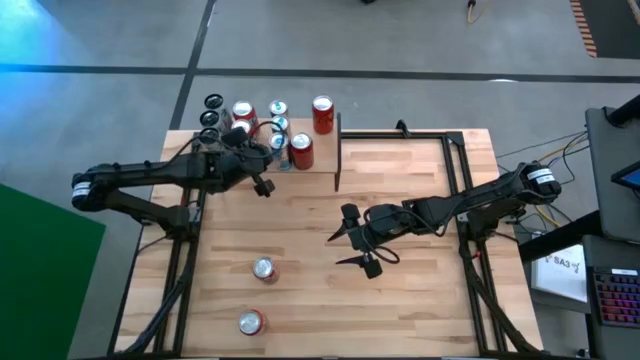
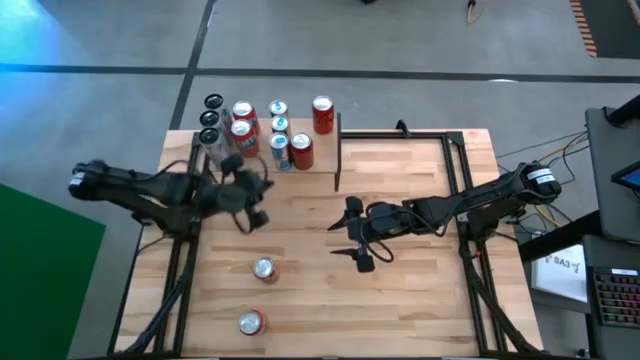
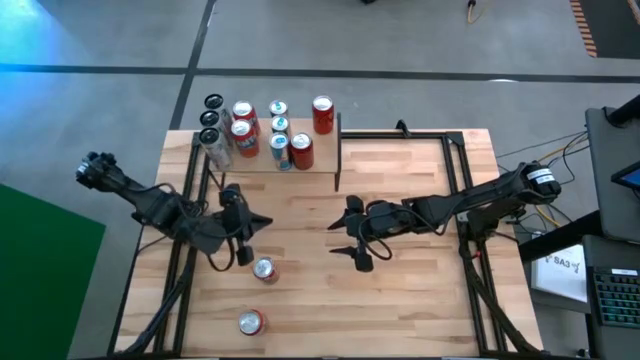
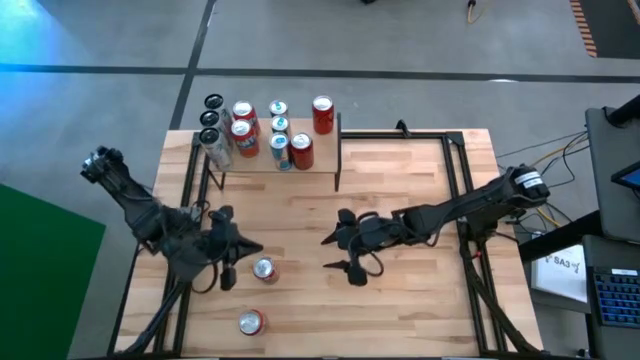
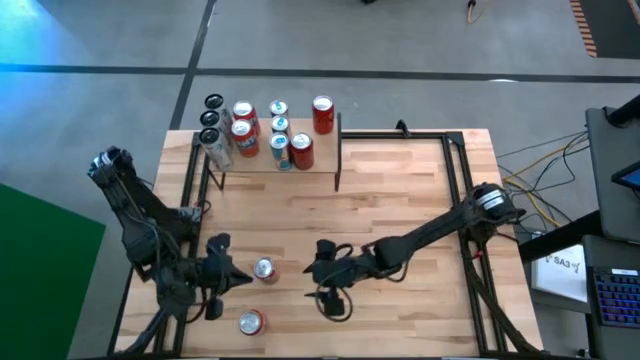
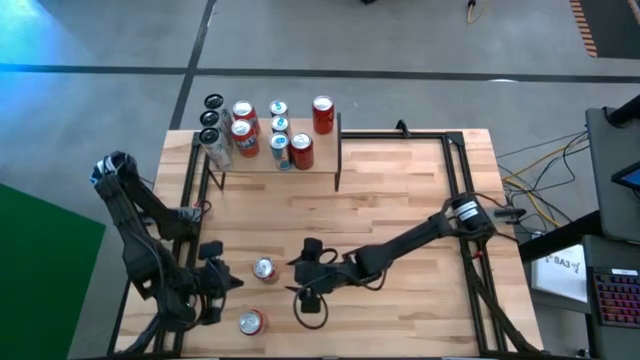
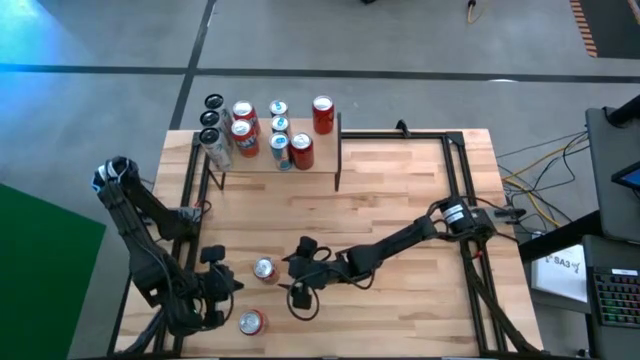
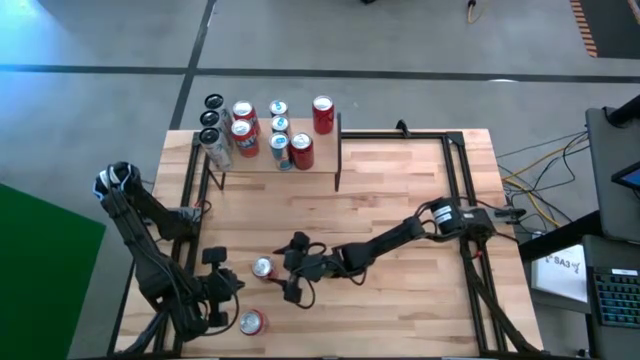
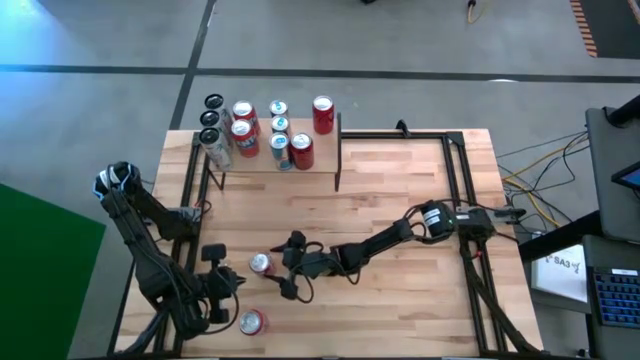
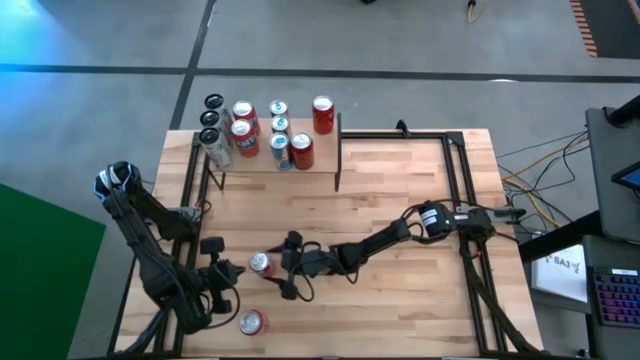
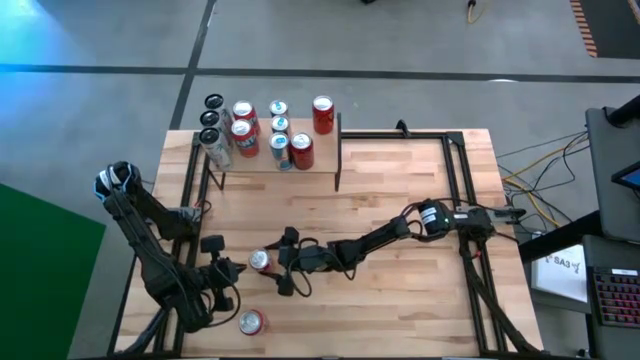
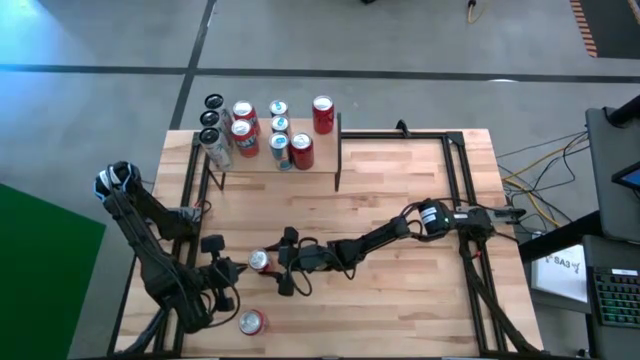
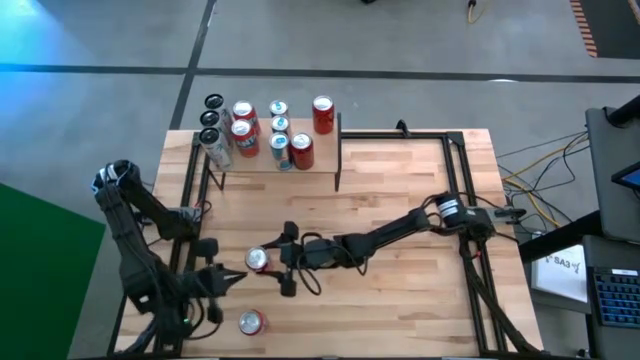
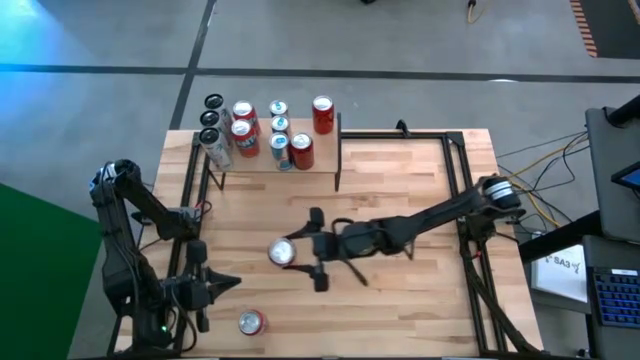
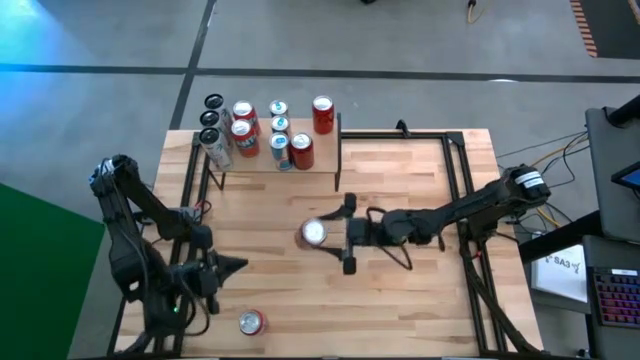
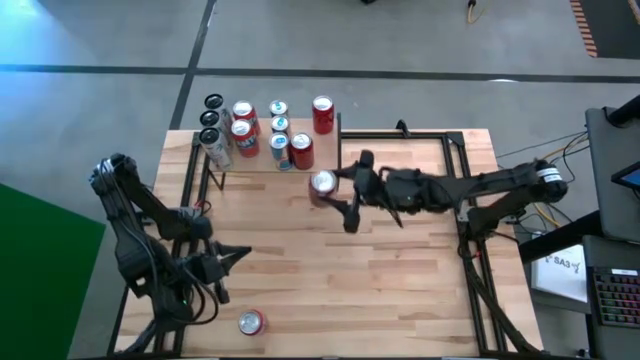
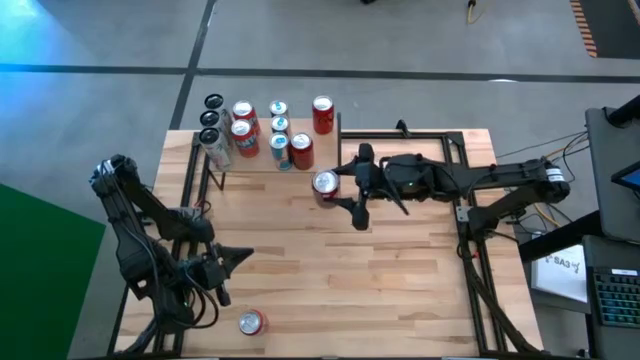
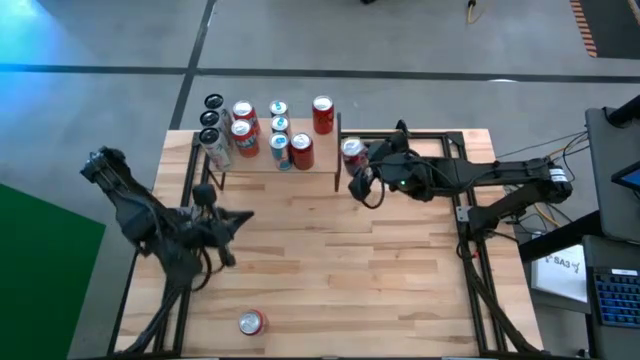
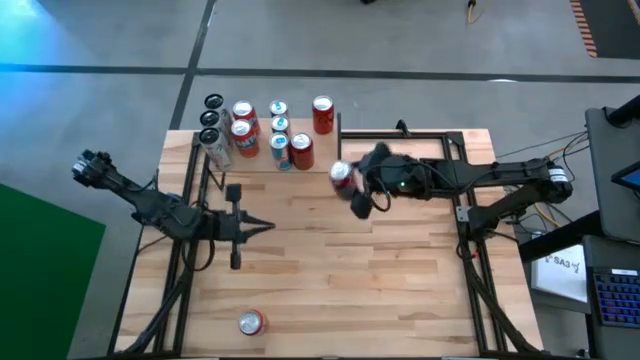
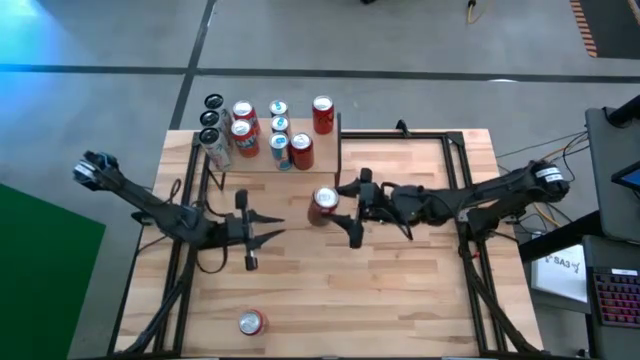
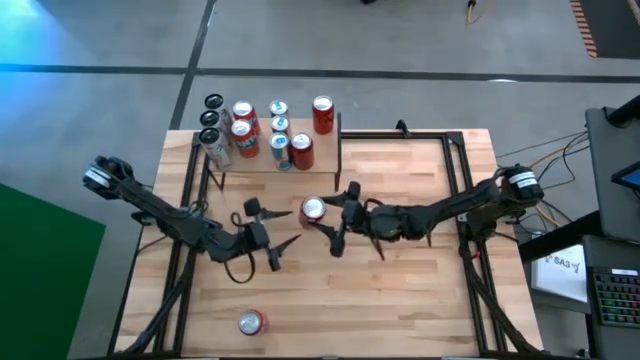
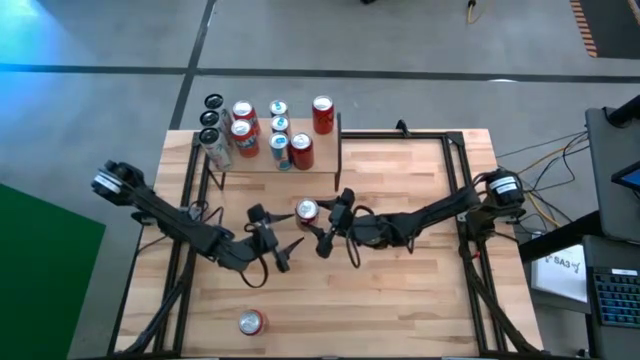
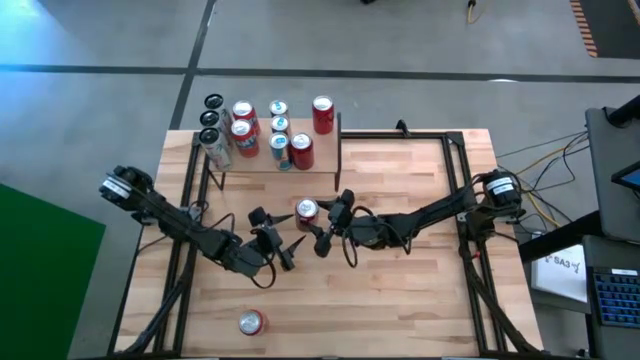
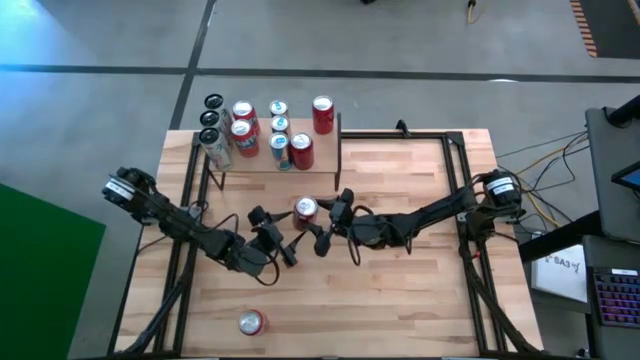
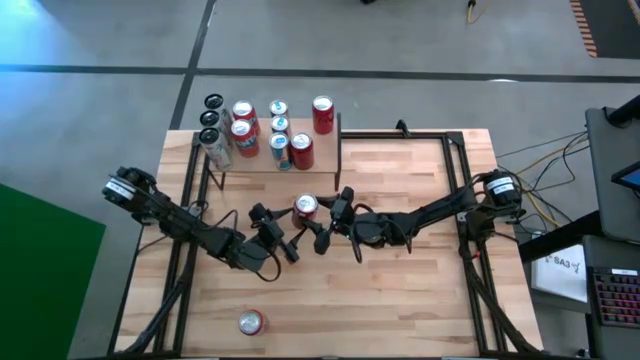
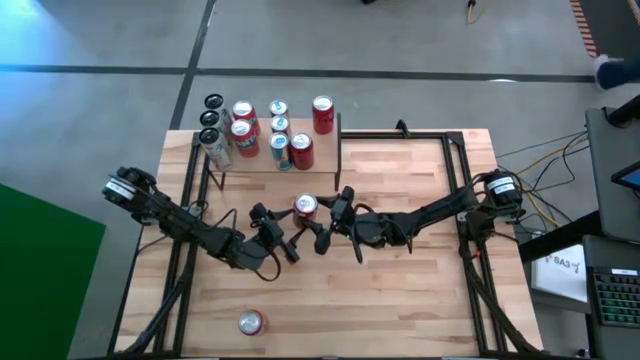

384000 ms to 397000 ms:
Task: Place canned beverage on shelf
Put the red white soda can on the shelf

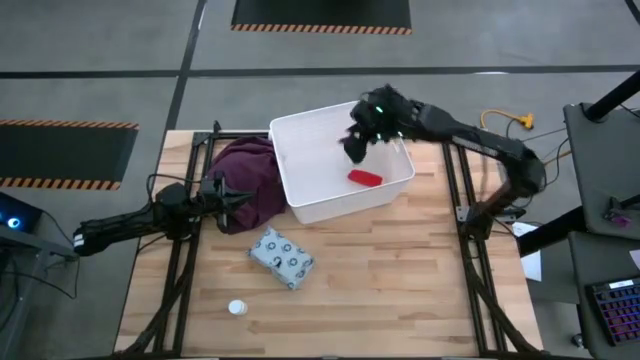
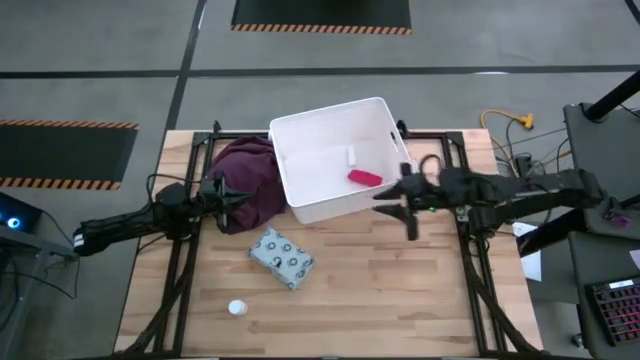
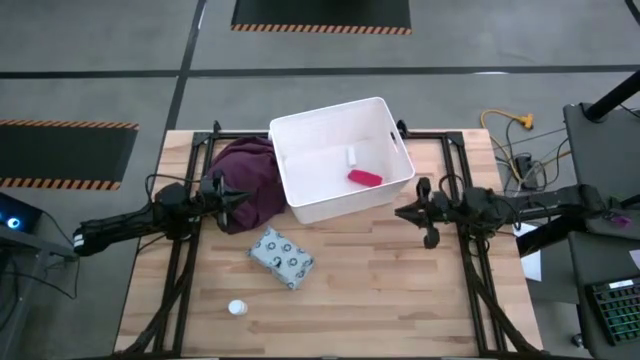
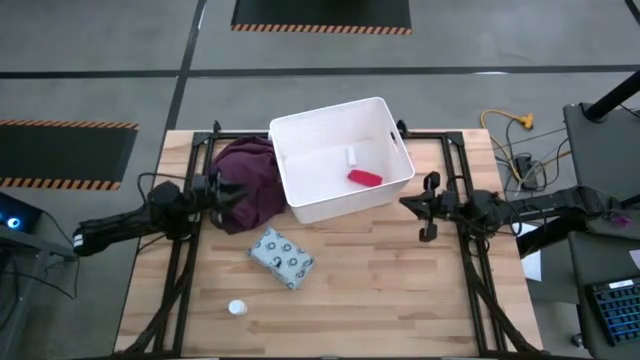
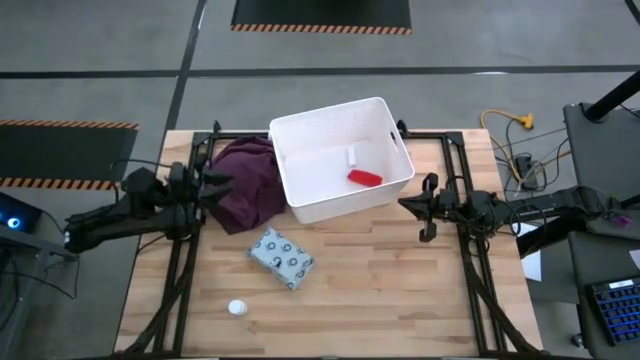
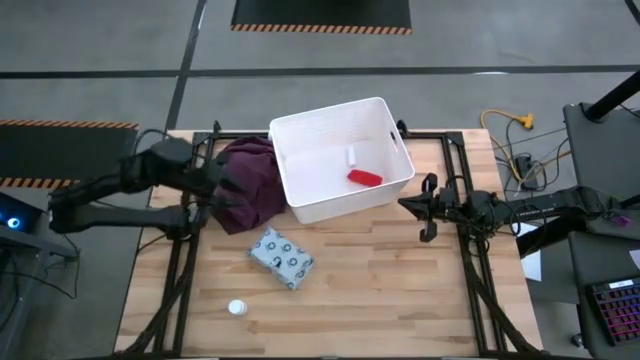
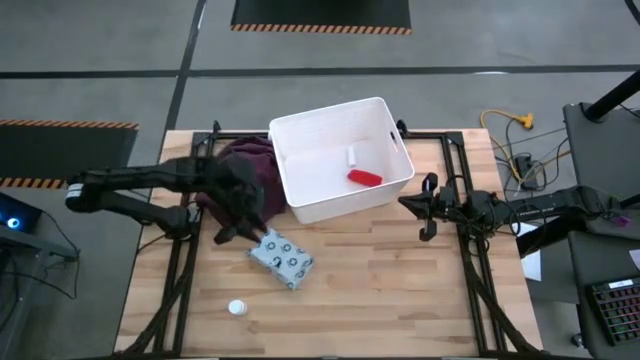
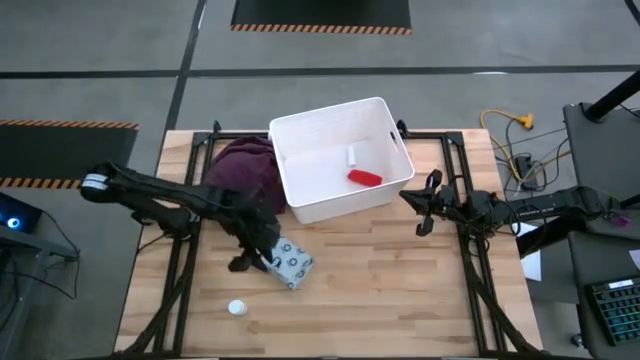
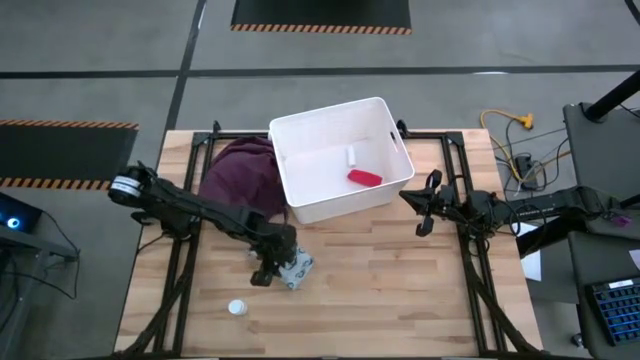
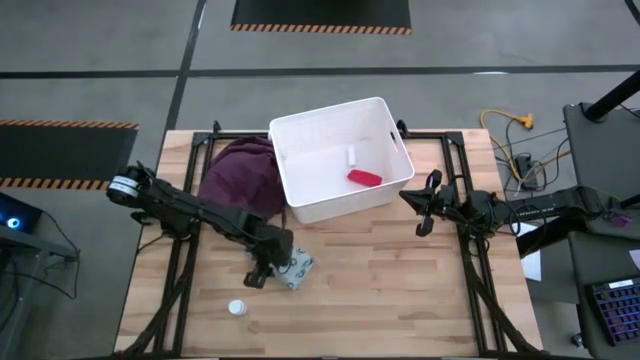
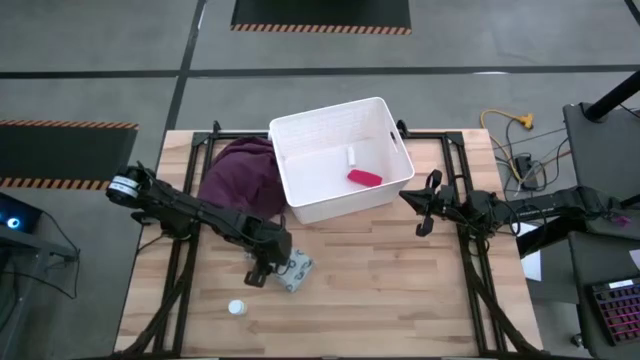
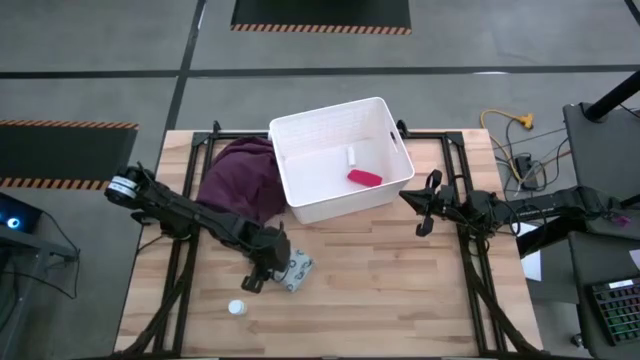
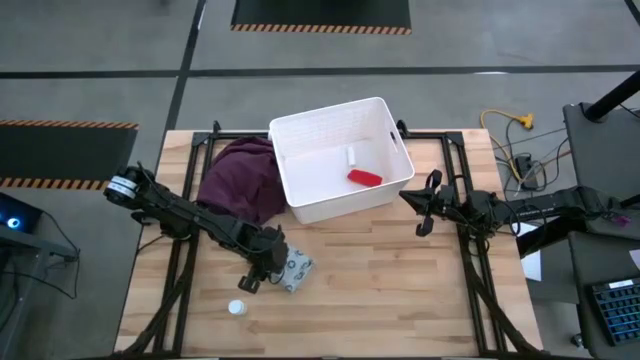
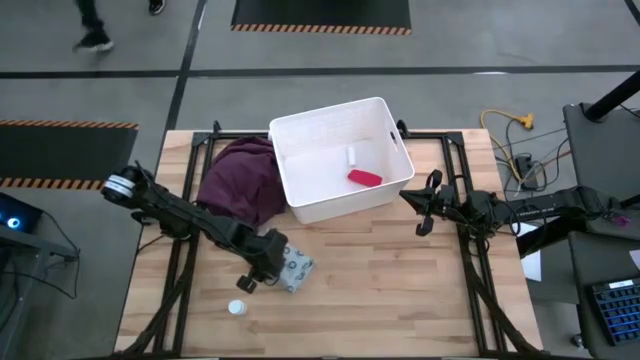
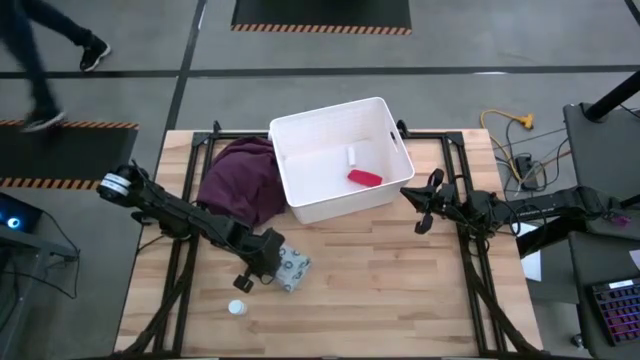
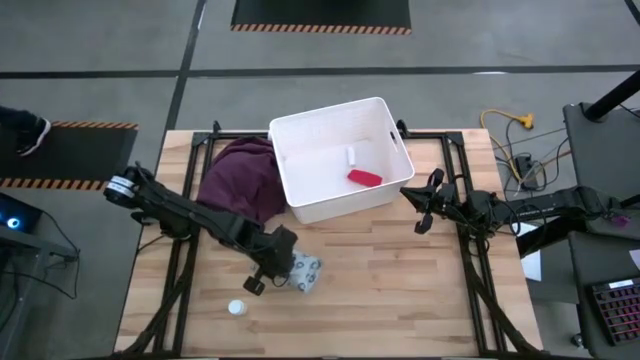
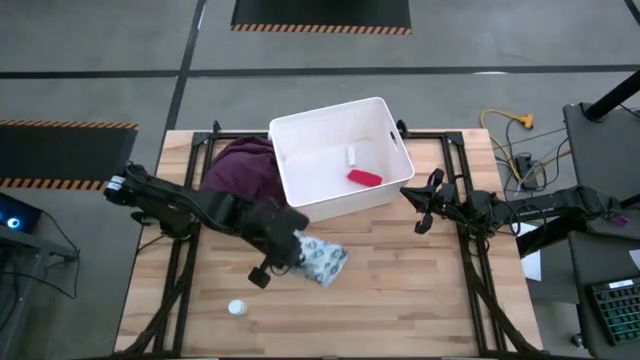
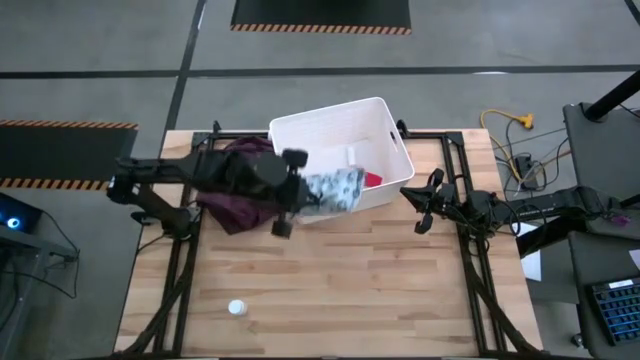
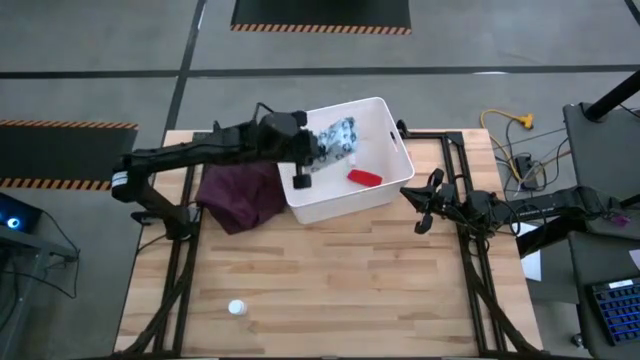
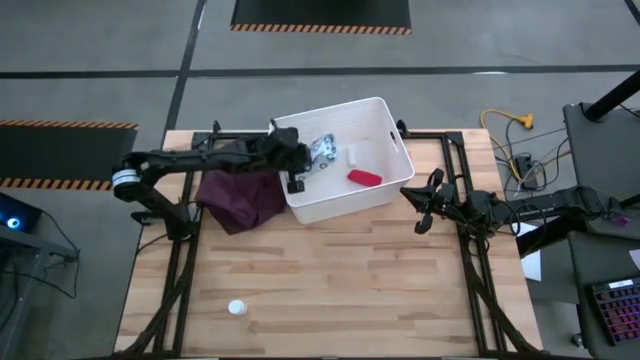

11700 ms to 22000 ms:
Task: Pick & place medical supplies in basket/bin
Put the blue mailer bag into the white bin
